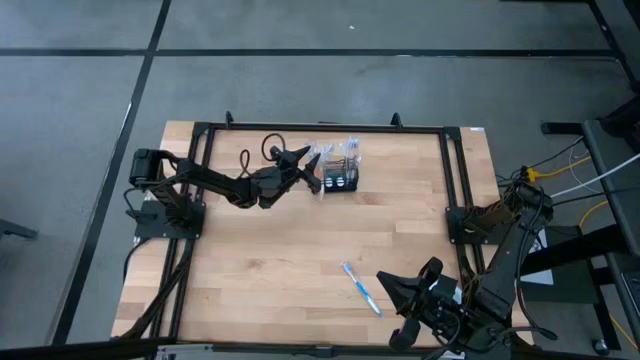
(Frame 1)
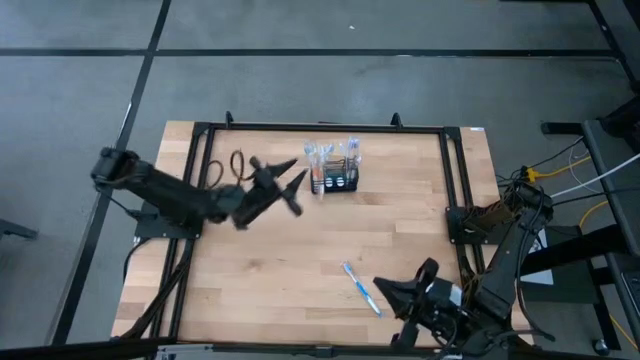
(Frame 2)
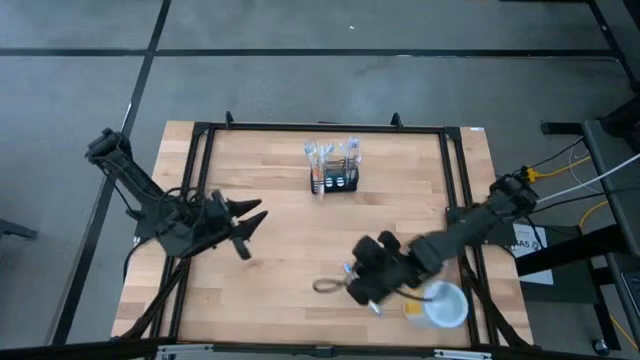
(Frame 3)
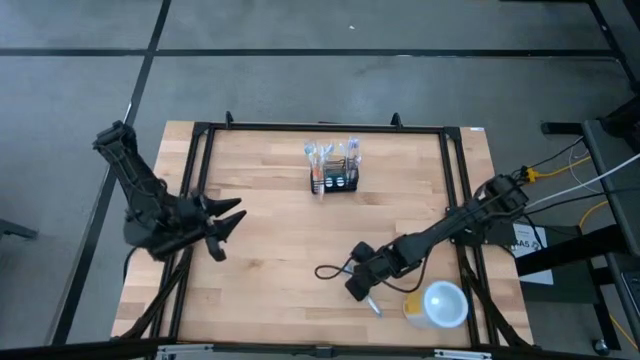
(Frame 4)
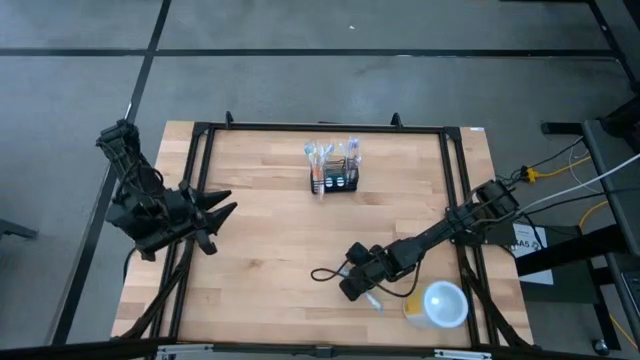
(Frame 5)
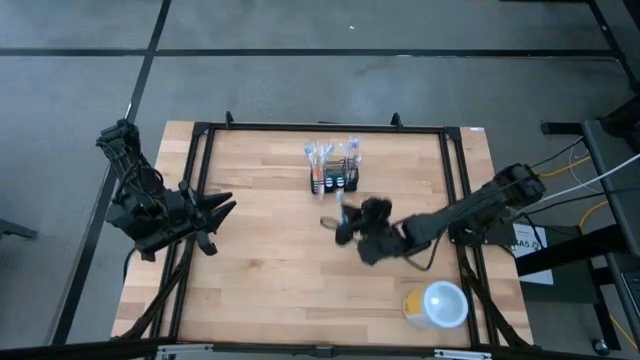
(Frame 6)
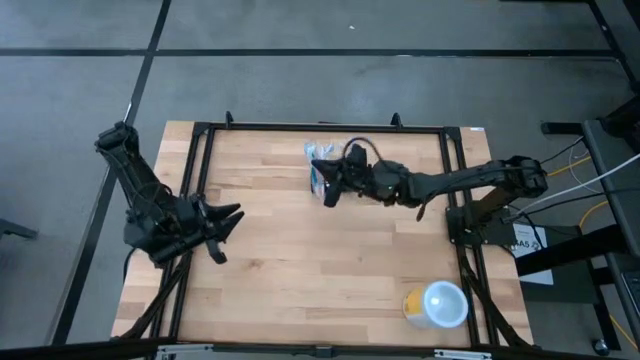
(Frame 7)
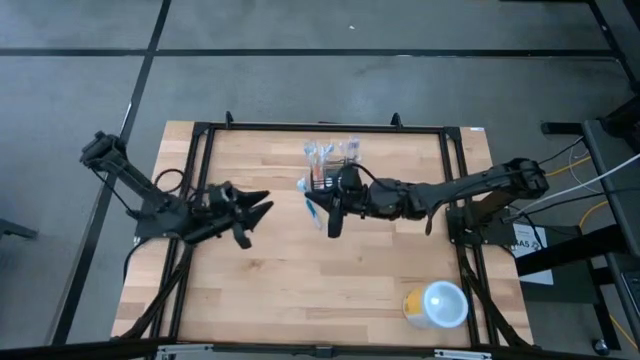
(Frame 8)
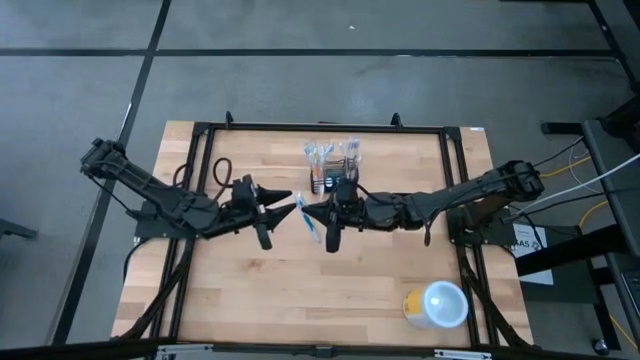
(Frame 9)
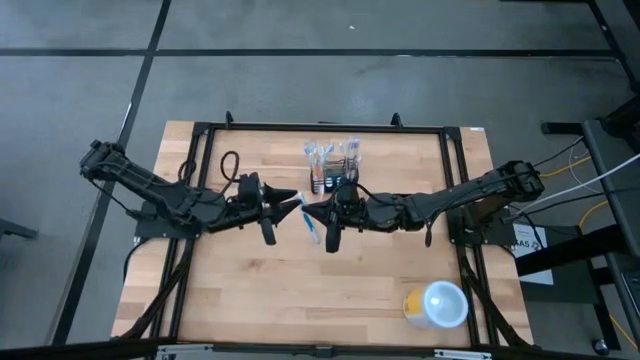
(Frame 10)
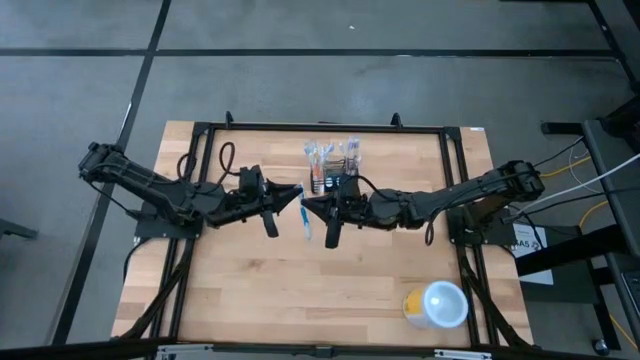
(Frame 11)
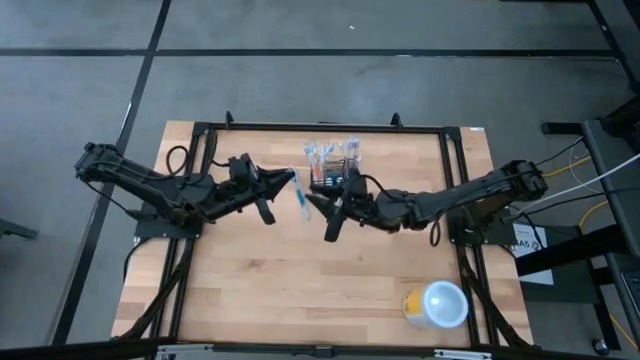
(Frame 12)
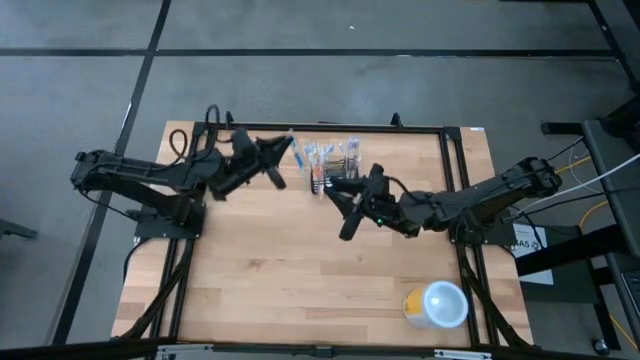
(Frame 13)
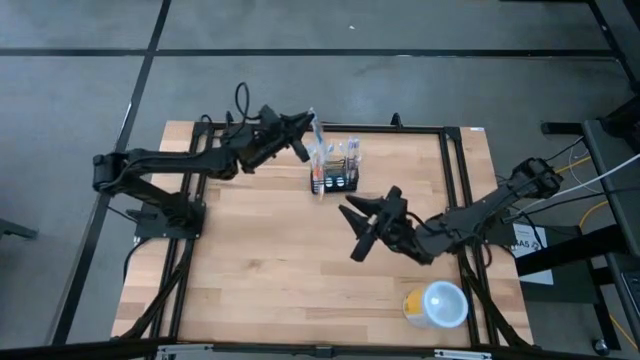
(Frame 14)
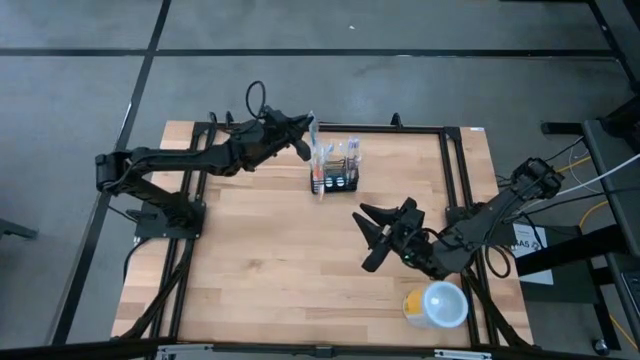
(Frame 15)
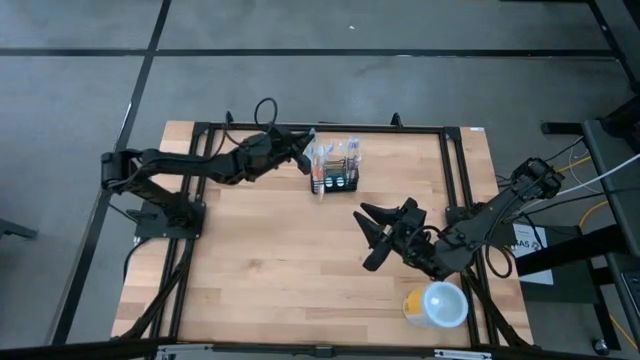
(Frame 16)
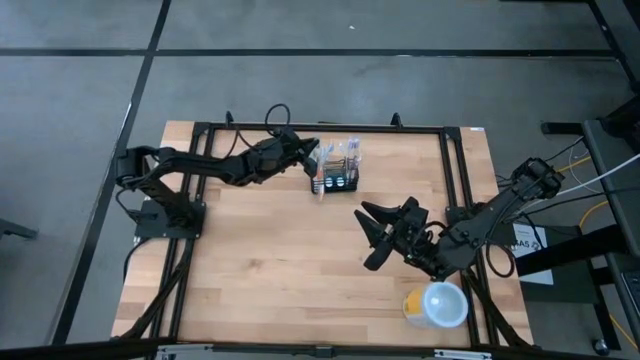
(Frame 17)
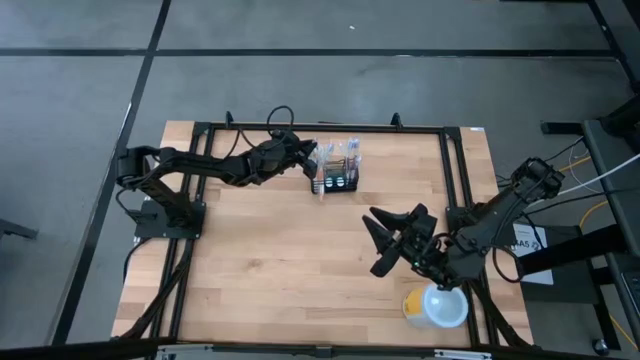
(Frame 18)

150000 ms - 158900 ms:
Task: Pick & Place toothbrushing station
Put the blue toothbrush into the left section of the mesh organizer

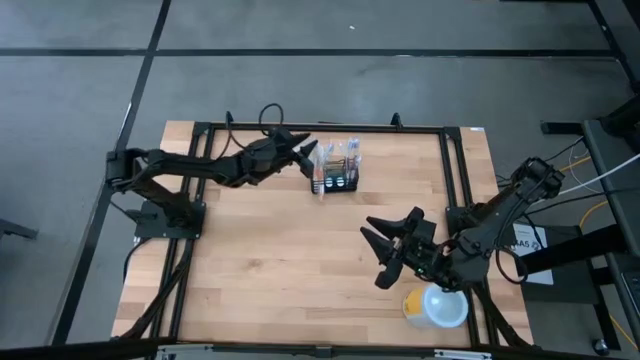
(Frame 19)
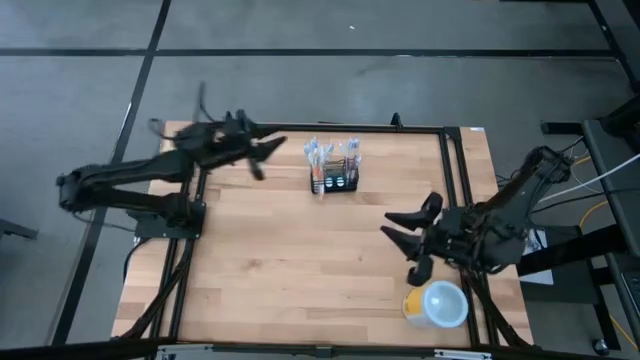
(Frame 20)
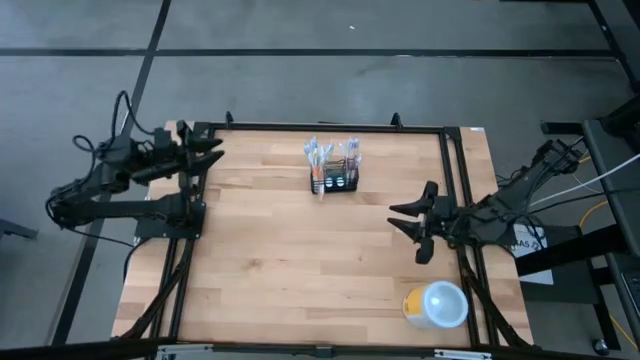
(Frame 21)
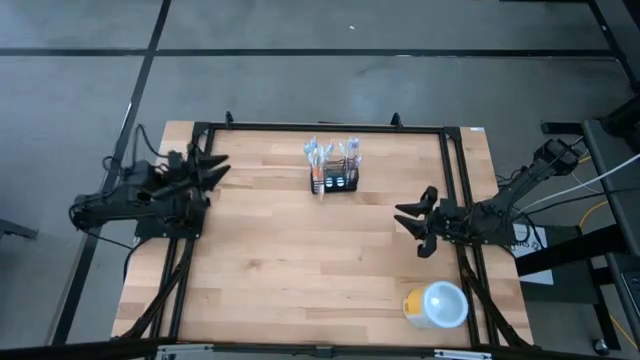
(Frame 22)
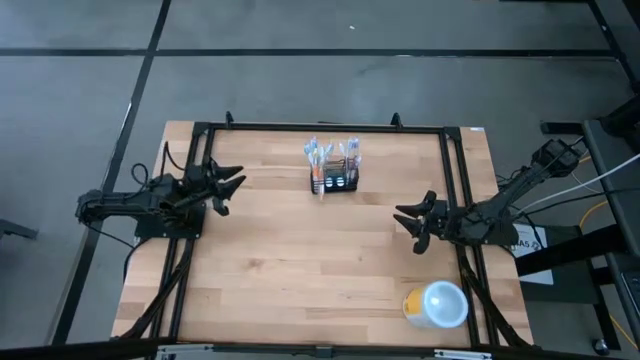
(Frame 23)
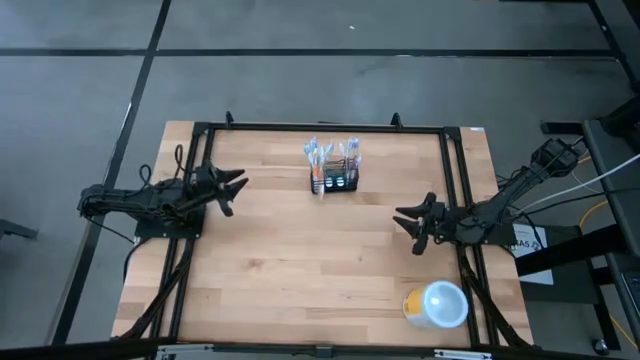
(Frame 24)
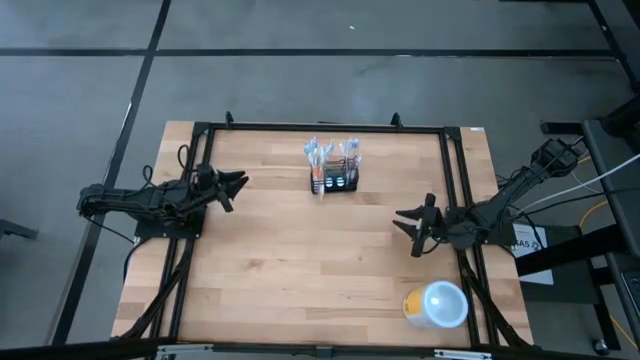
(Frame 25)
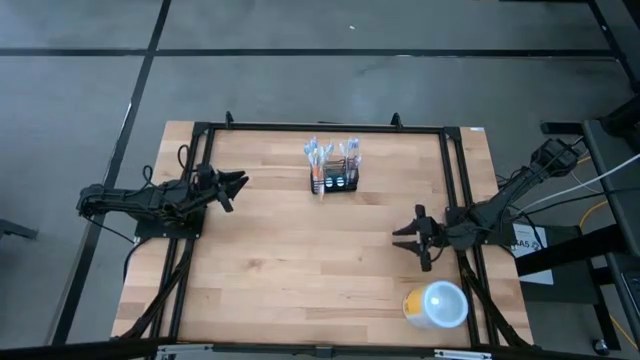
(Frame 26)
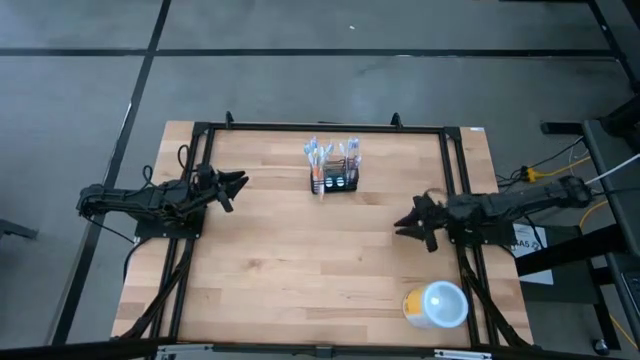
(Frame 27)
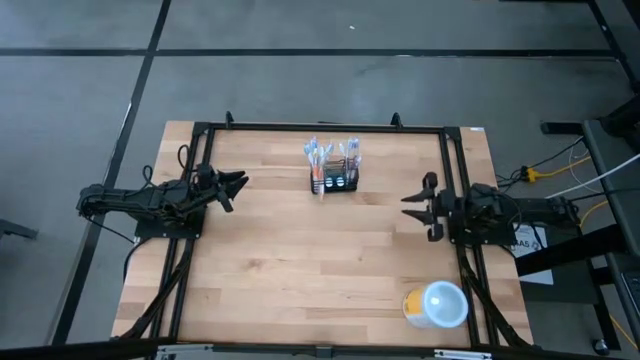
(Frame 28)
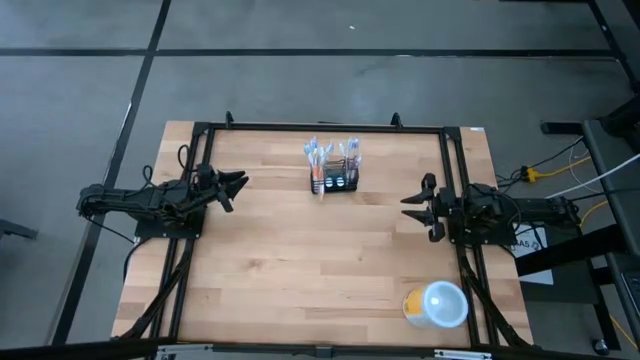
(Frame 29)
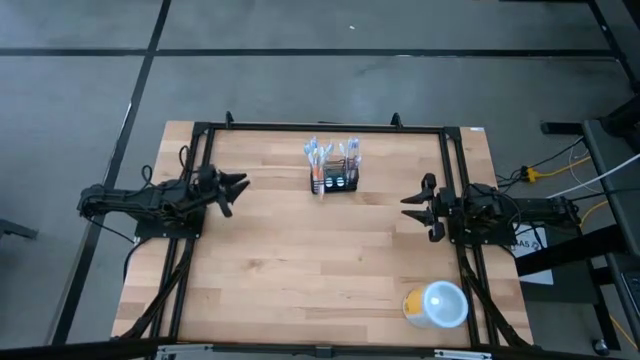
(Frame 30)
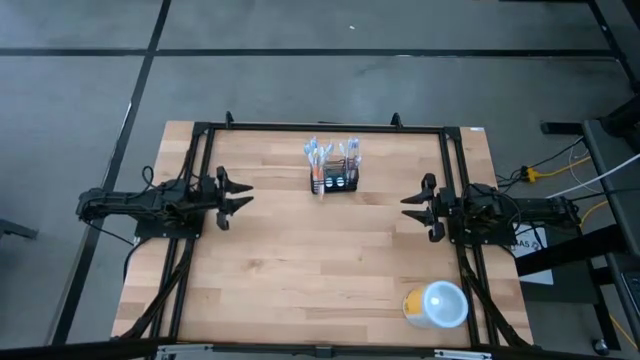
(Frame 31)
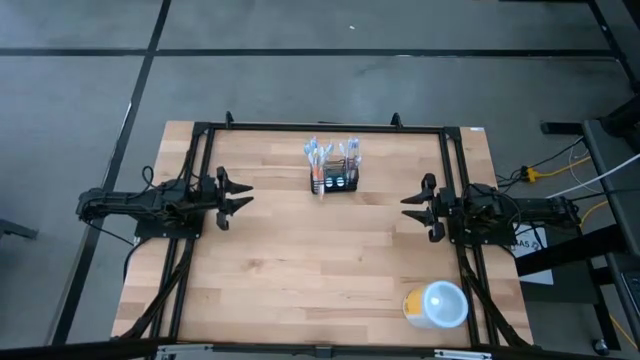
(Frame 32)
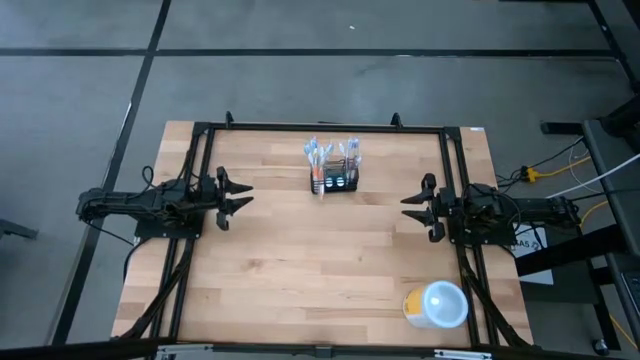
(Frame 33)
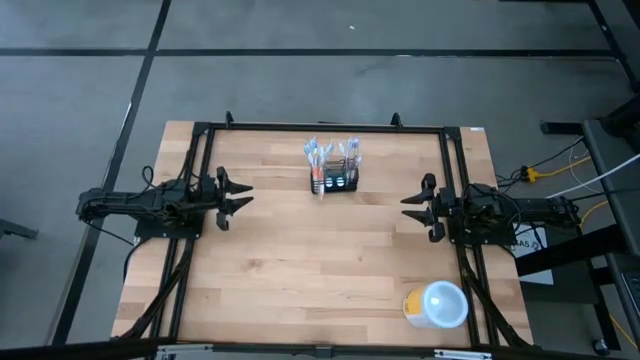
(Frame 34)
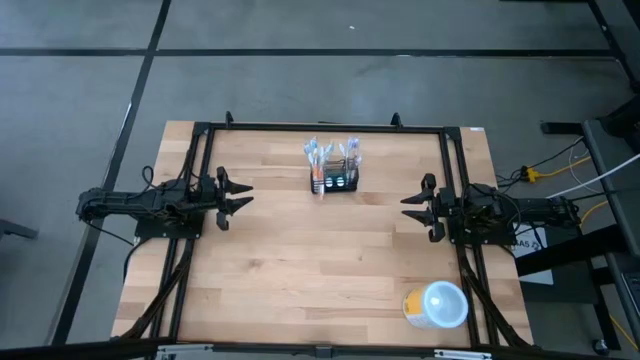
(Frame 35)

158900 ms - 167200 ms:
Return to Home Position

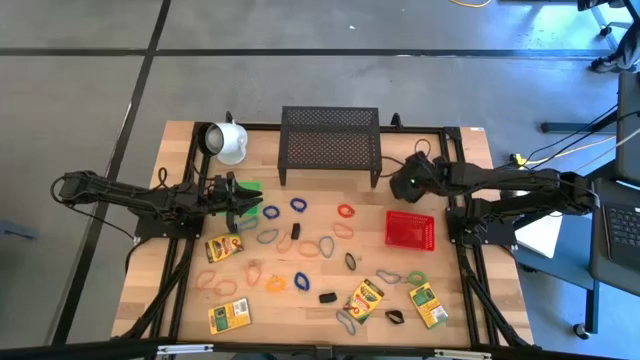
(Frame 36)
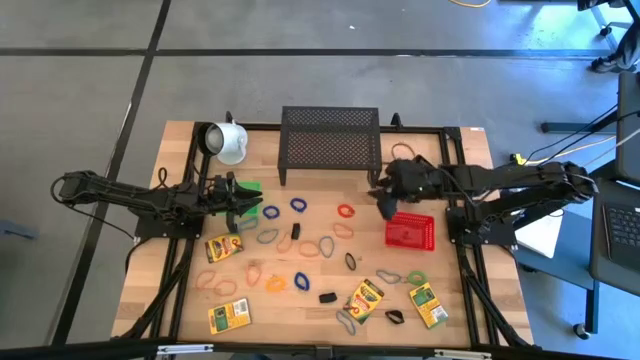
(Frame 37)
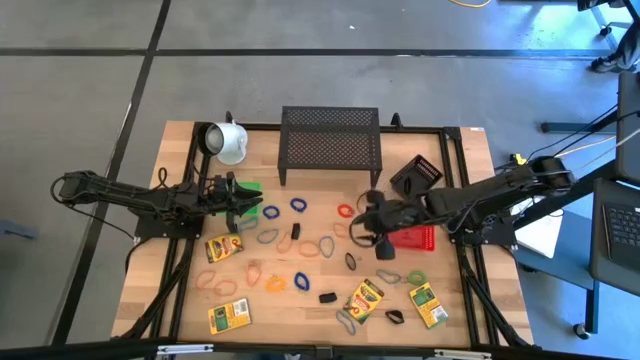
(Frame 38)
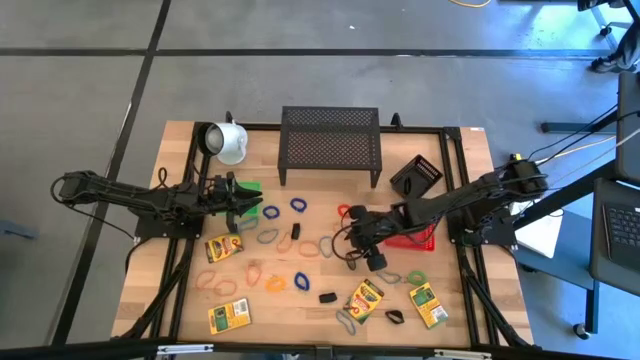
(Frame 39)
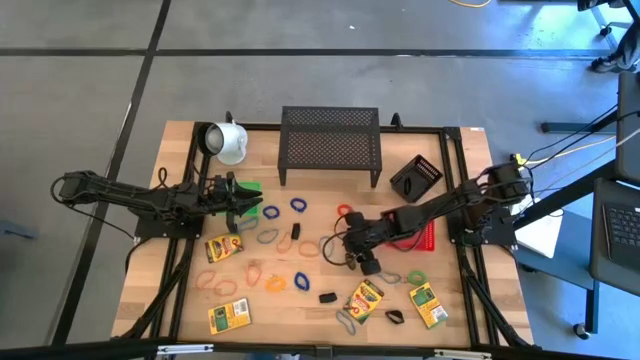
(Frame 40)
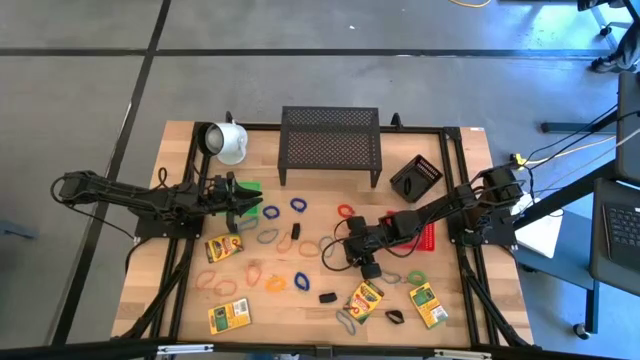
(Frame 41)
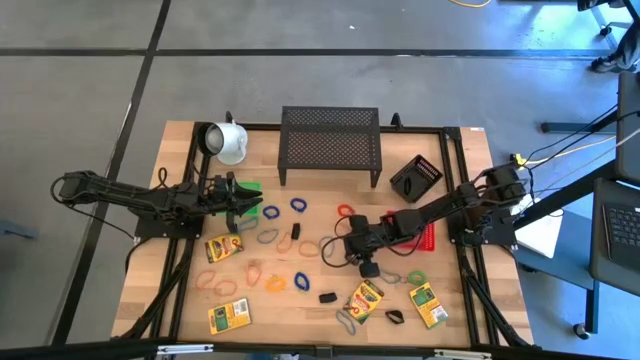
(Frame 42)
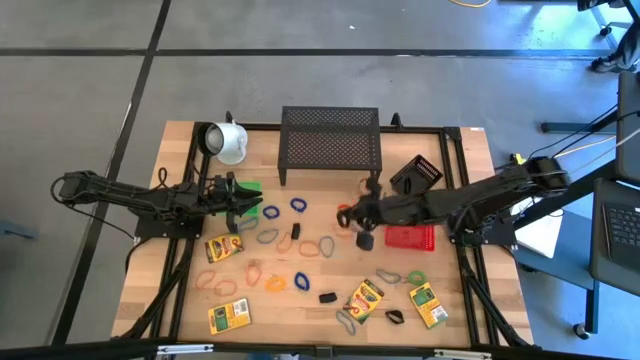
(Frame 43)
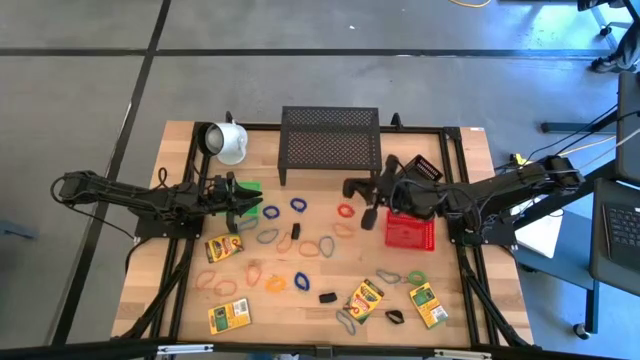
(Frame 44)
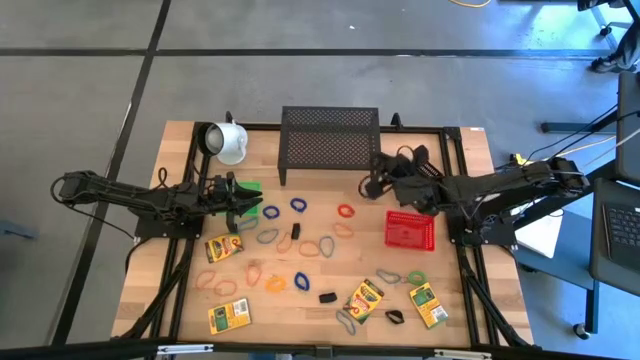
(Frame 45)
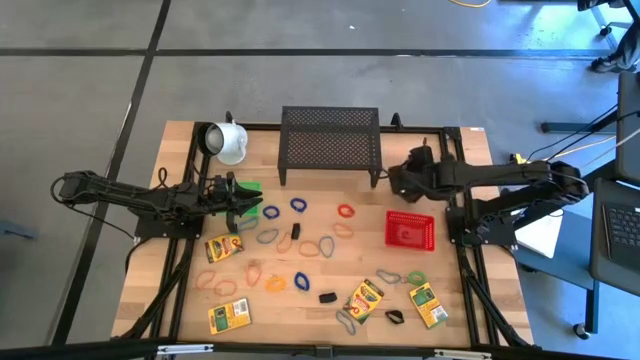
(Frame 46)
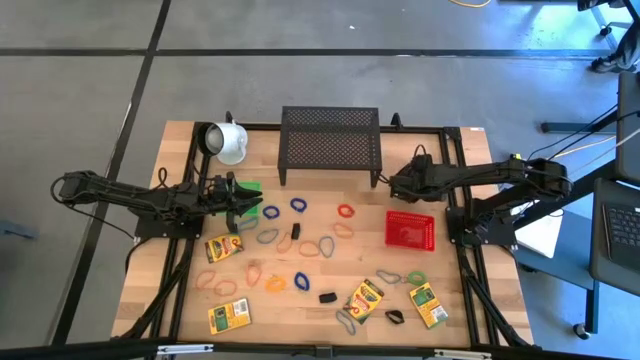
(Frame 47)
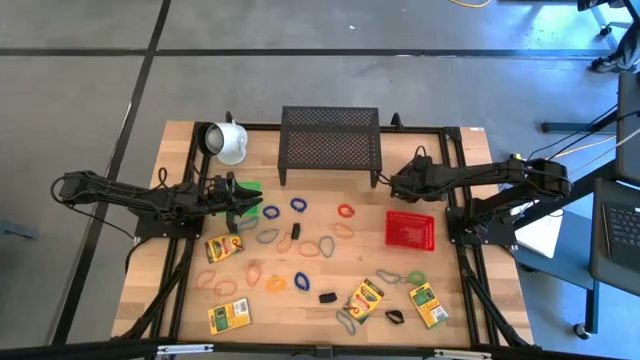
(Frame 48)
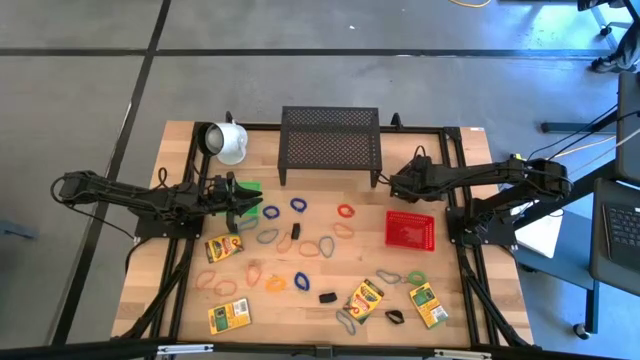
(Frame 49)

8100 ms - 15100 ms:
Task: Pick & Place Office Desk Supplies
Put the black rubber band band into the black bin
